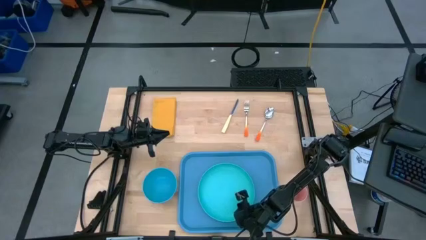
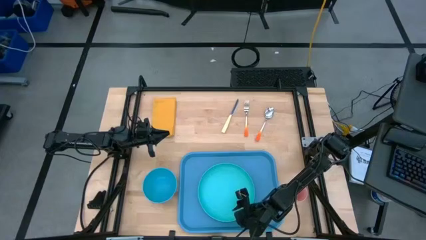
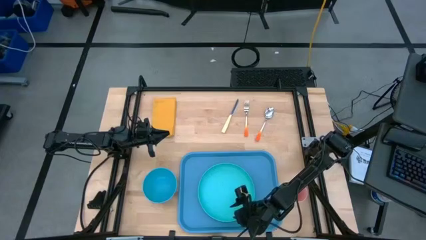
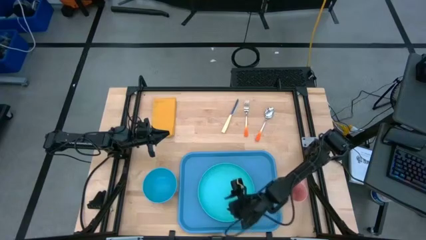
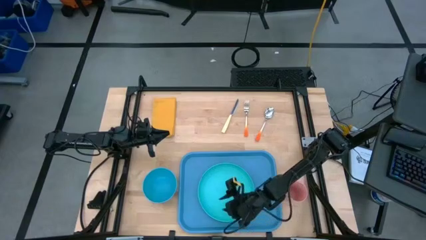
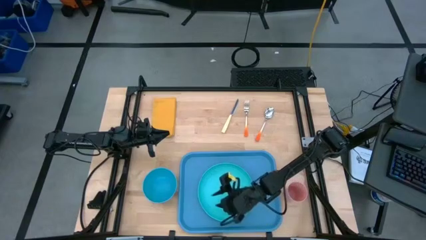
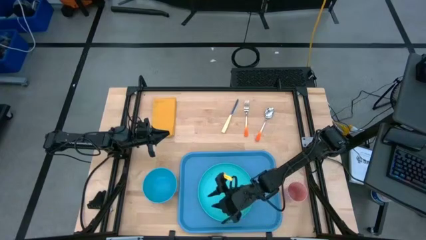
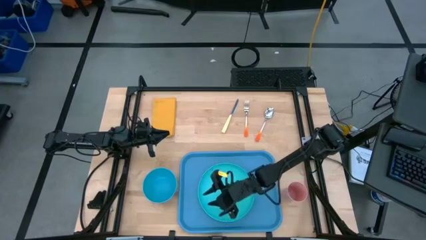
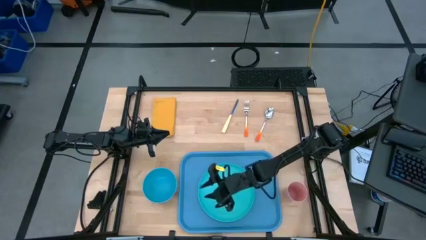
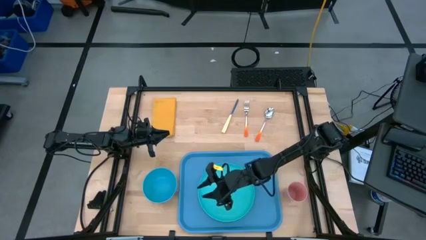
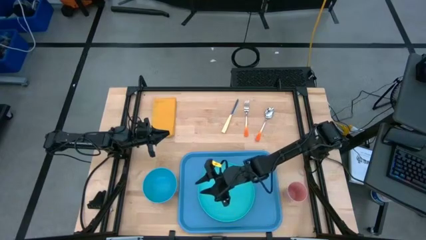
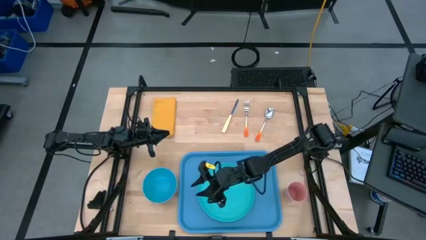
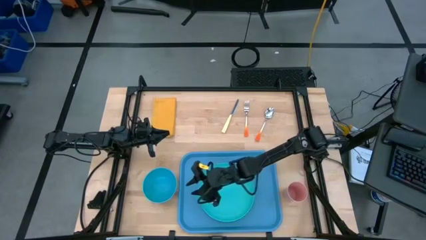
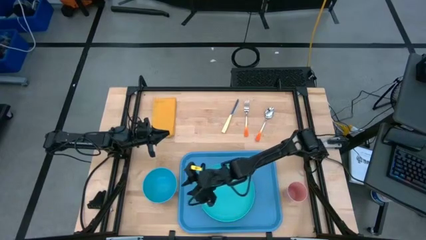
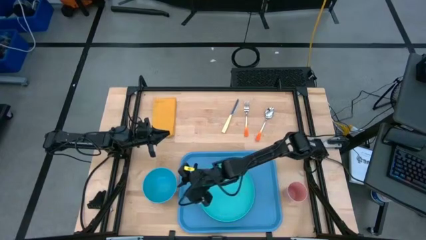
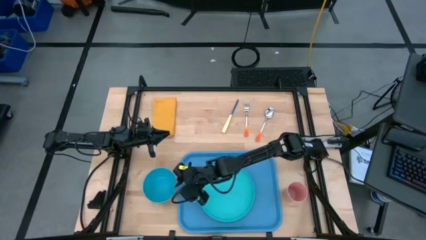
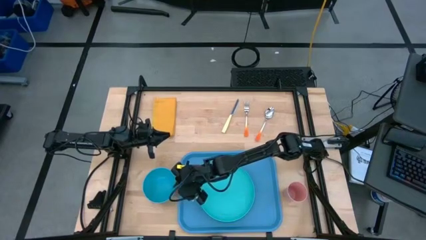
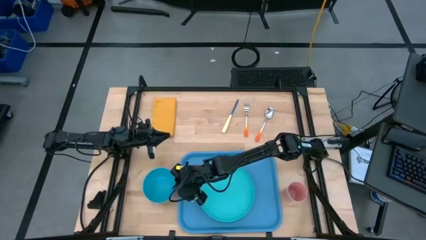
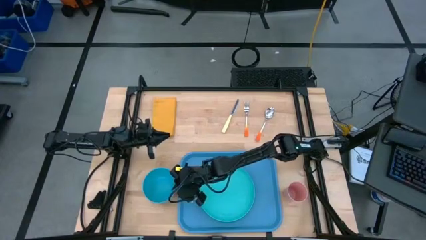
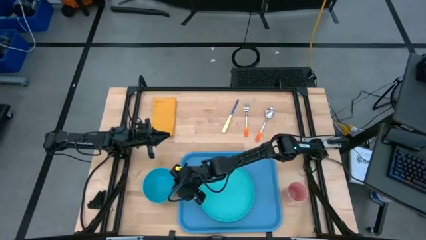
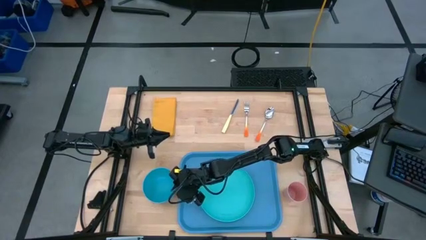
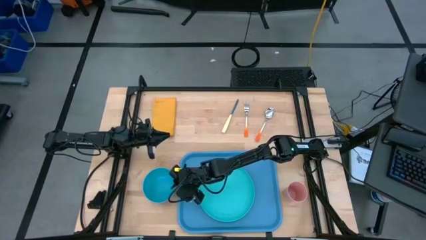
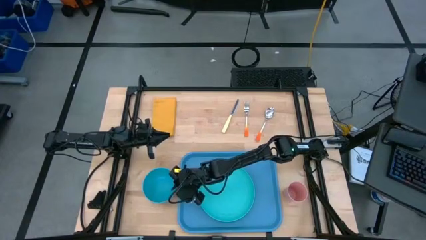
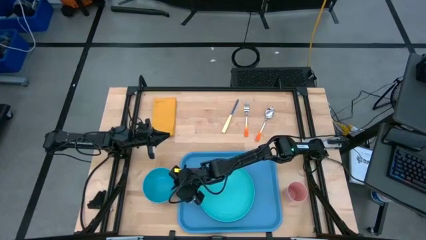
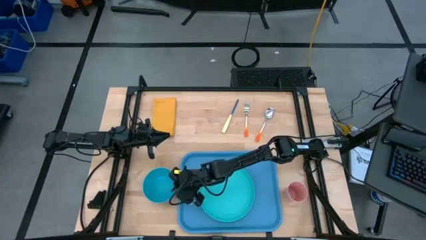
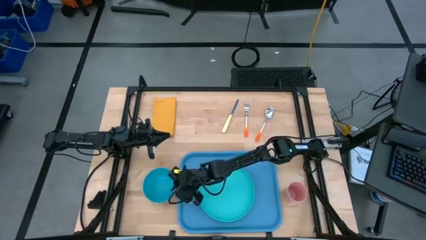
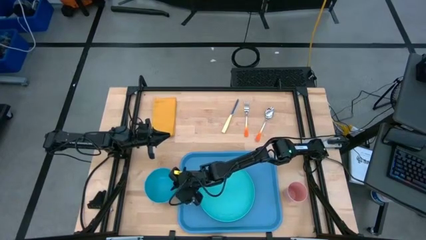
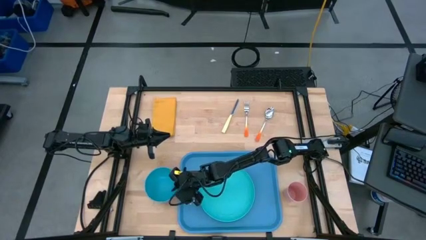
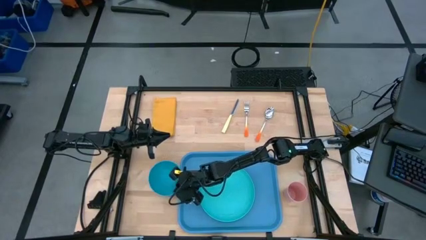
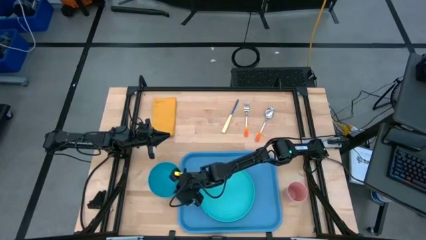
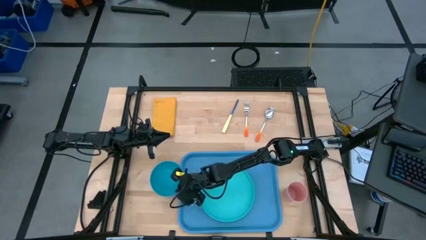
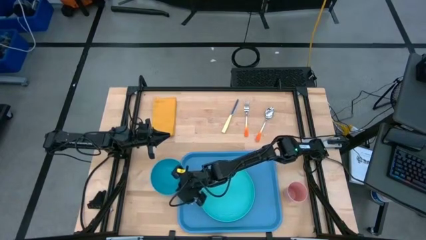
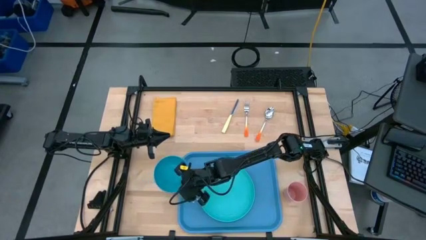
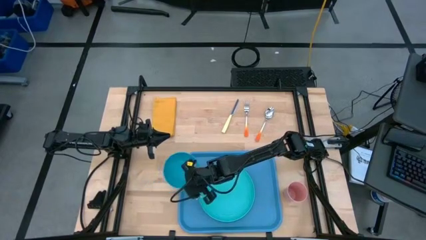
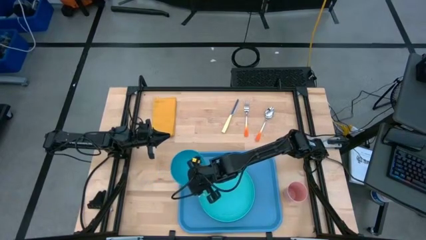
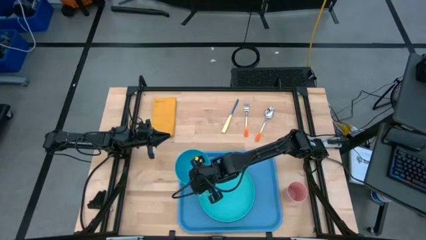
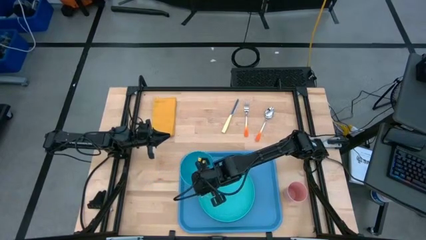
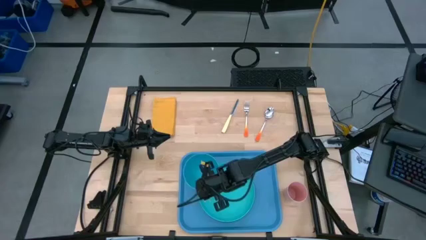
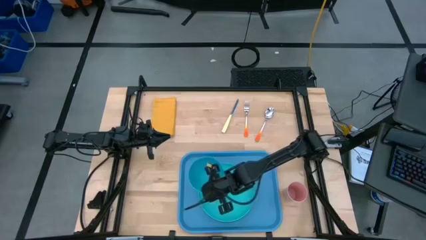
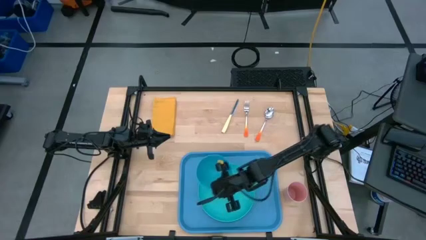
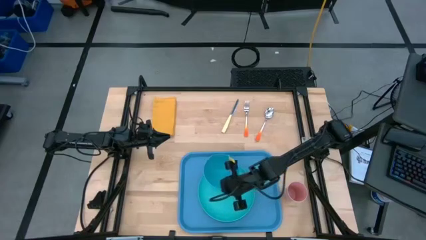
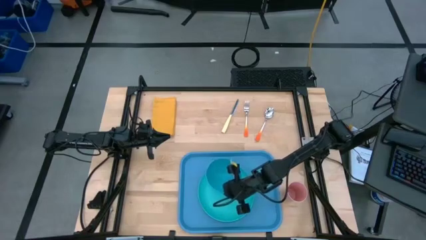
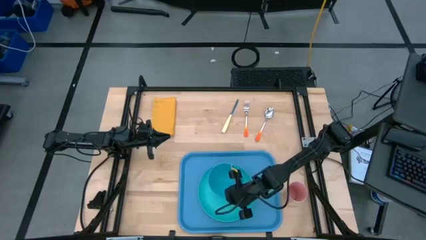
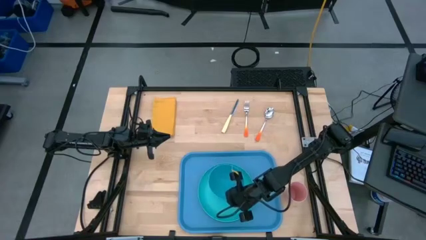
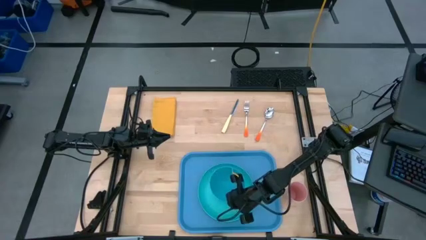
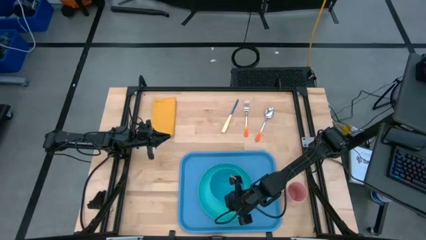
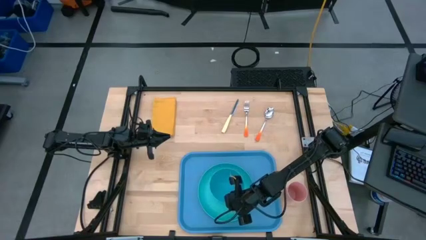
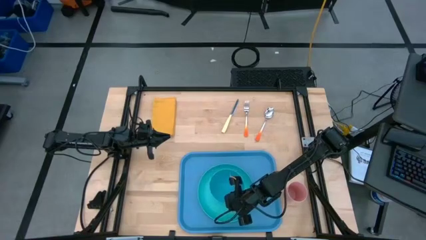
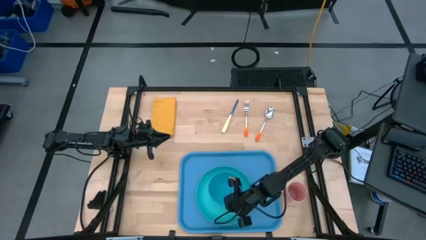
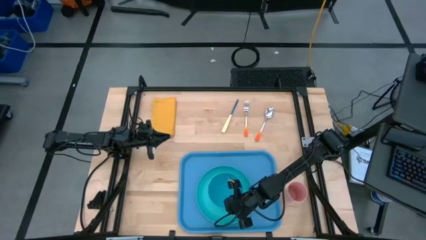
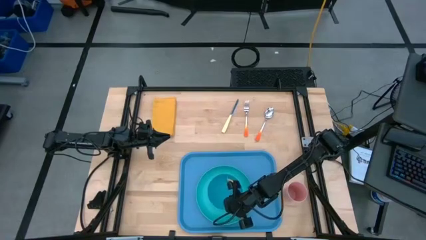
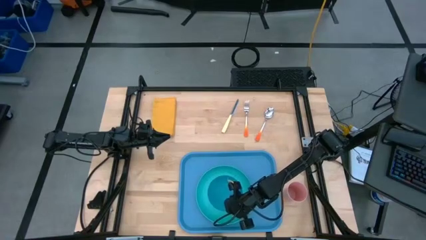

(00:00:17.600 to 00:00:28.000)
Task: Set up tray
Stack the blue bowl on top of the green plate on the tray
